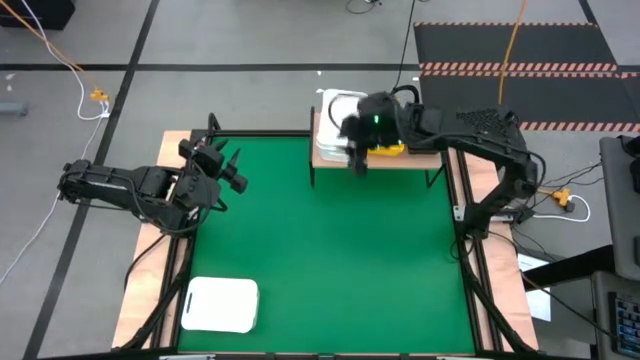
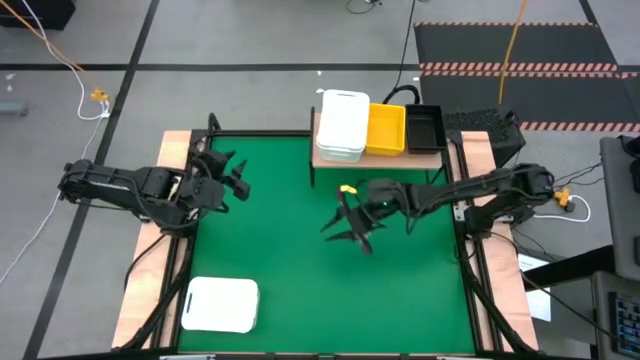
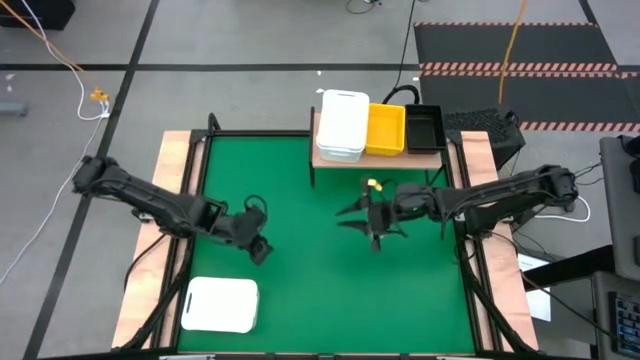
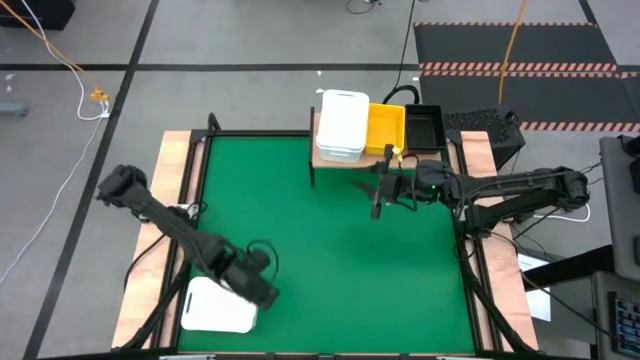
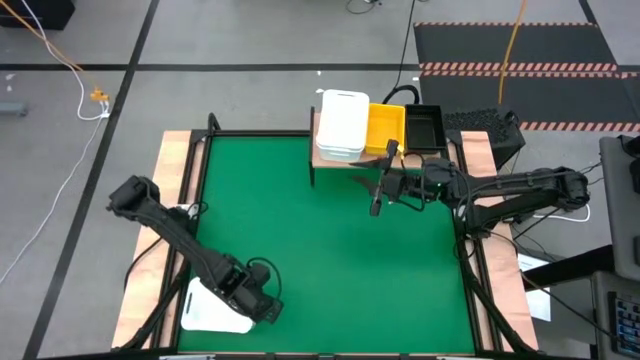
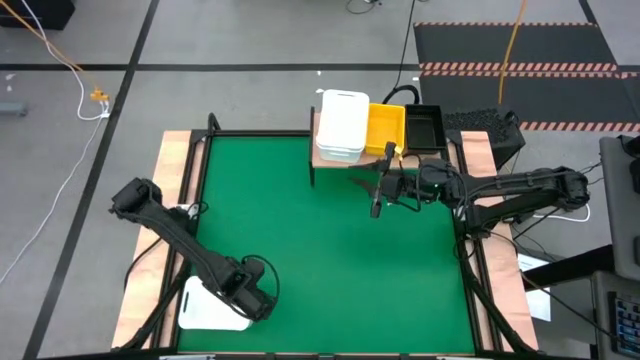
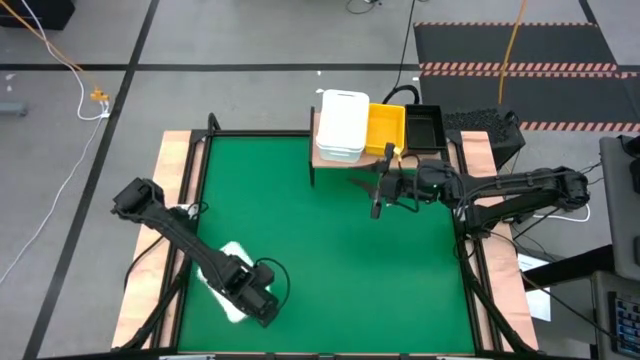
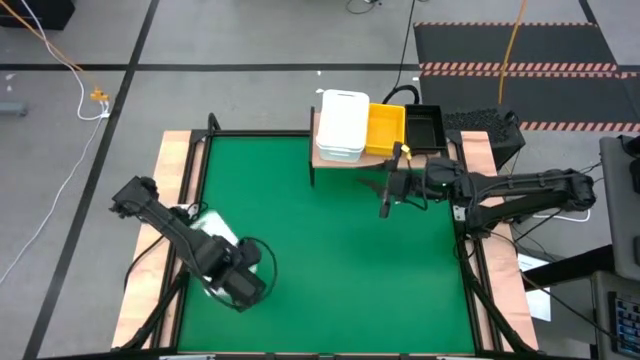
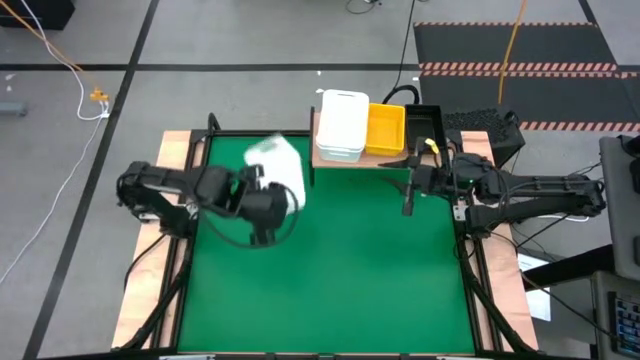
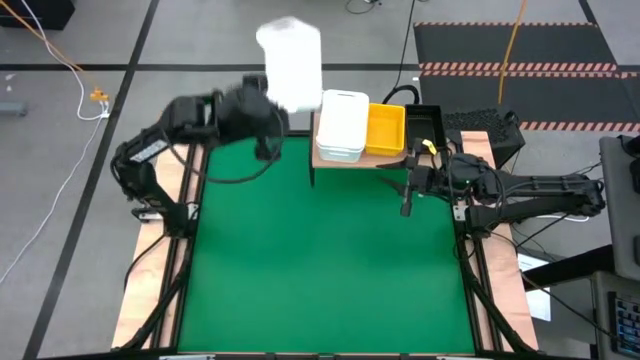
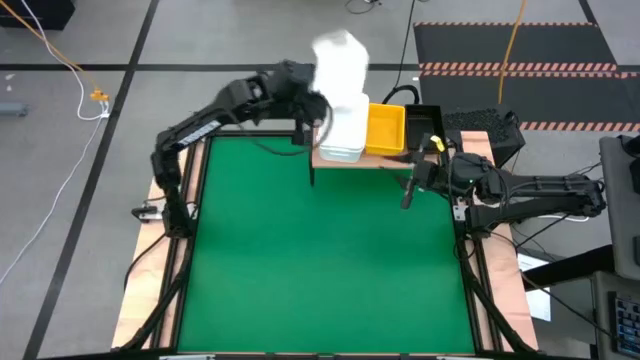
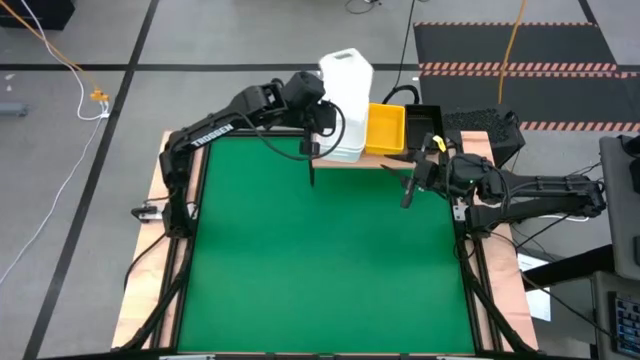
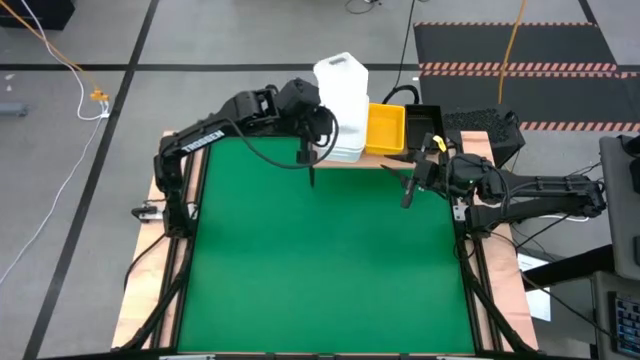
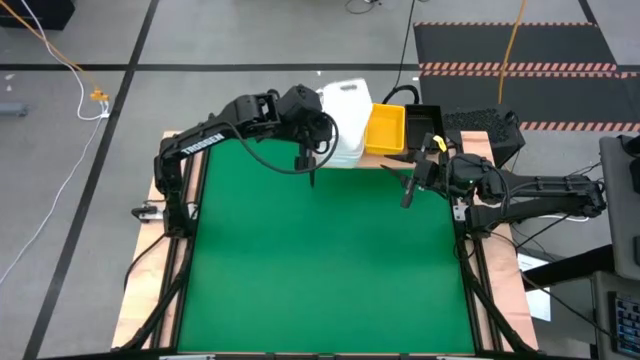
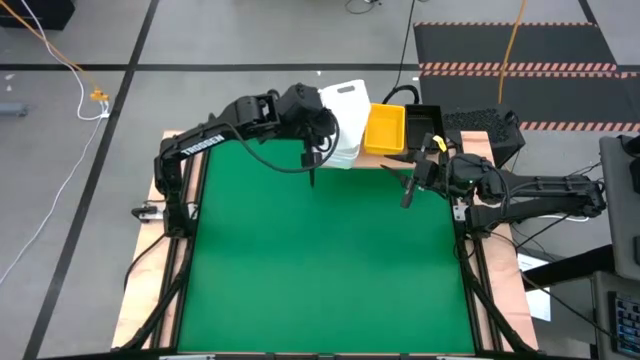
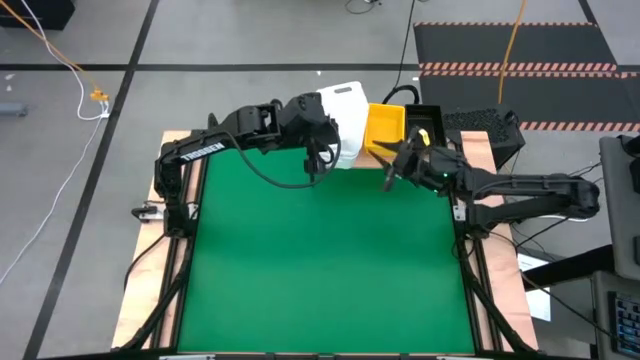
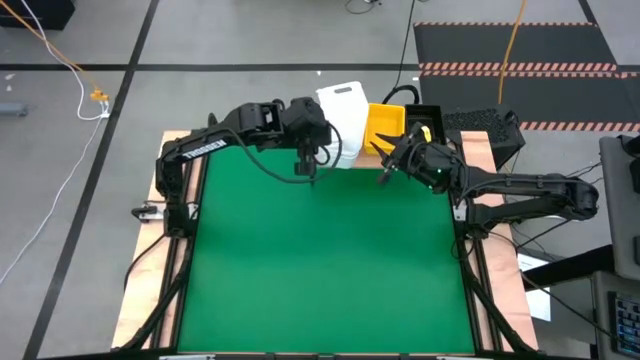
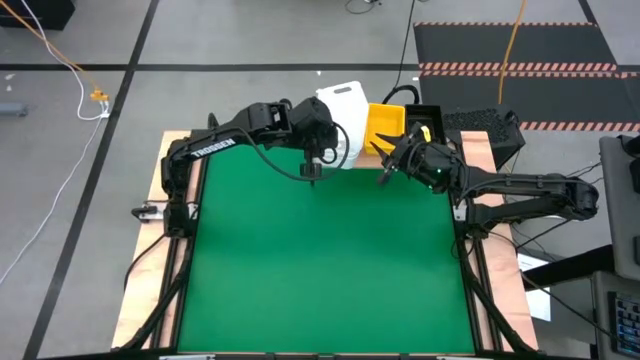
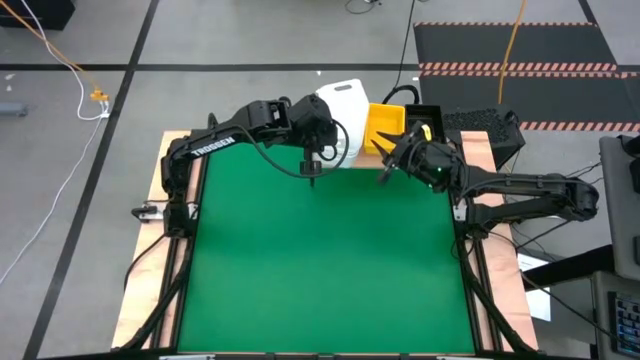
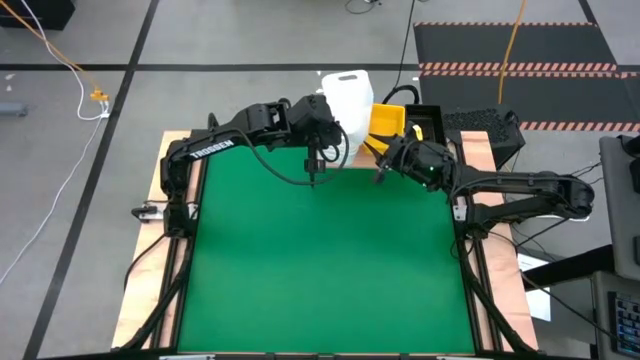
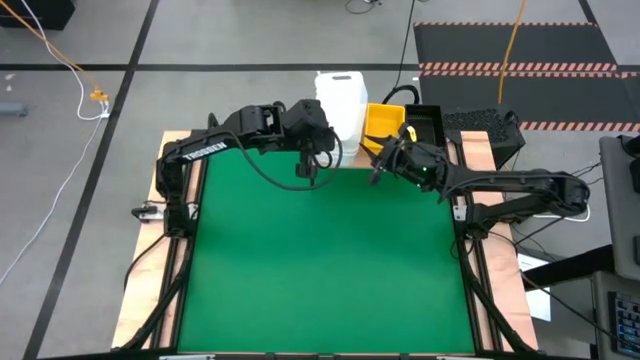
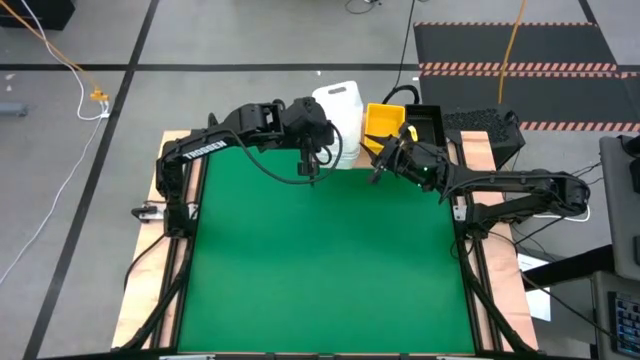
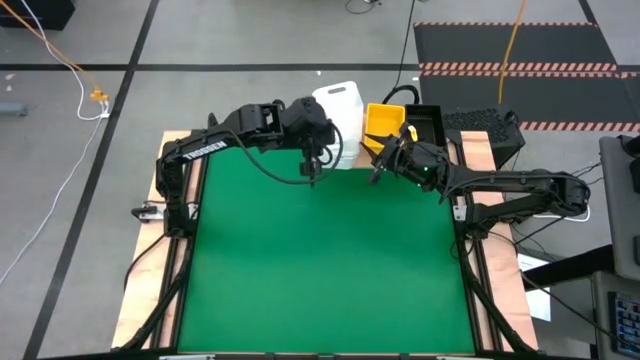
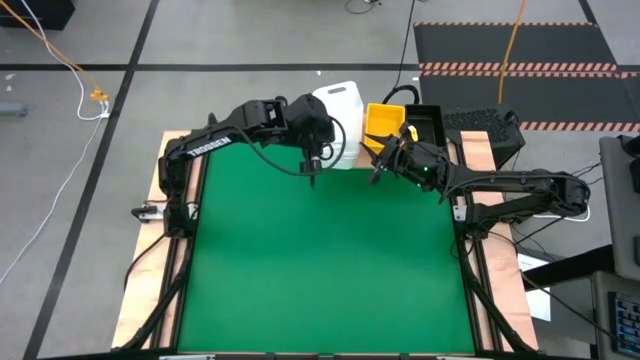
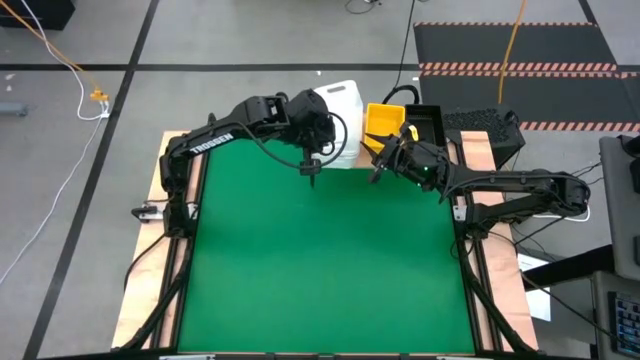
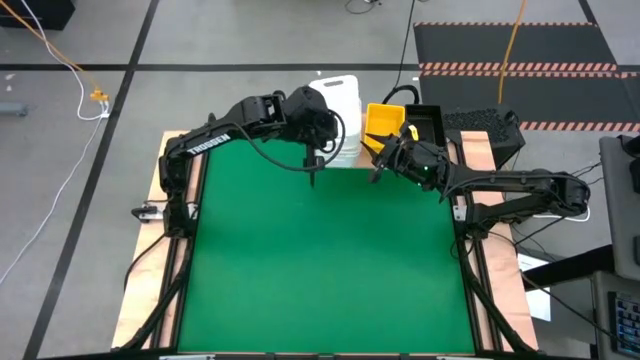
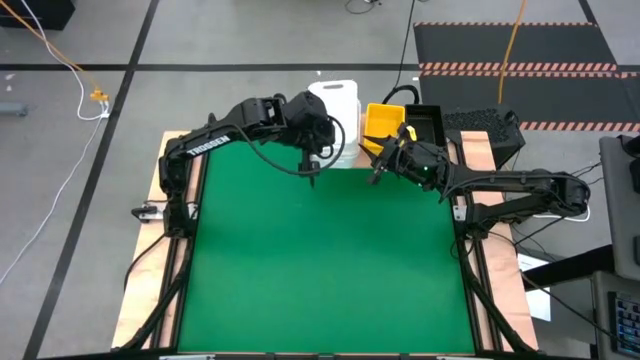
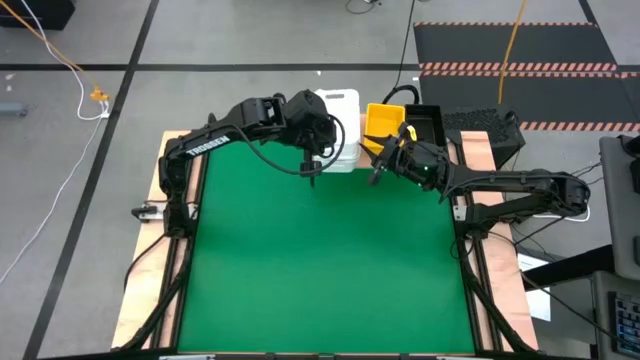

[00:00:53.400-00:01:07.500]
Task: Stack baskets on shelf by color
Stack the white bin into the stacked white bins on the shelf

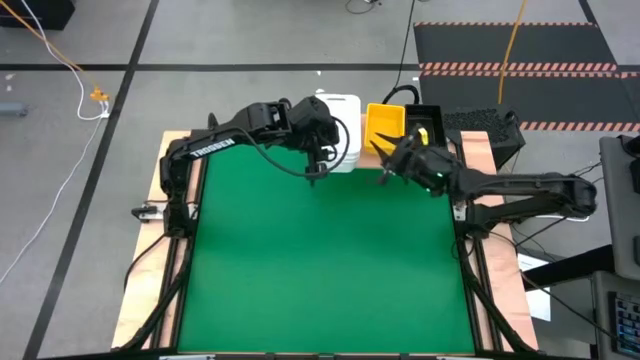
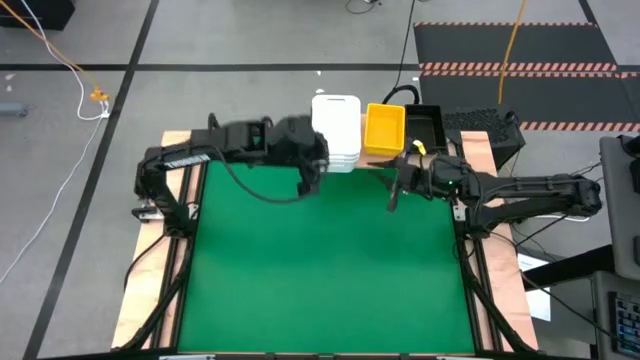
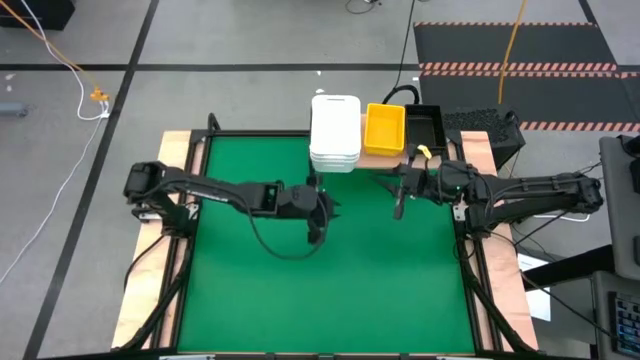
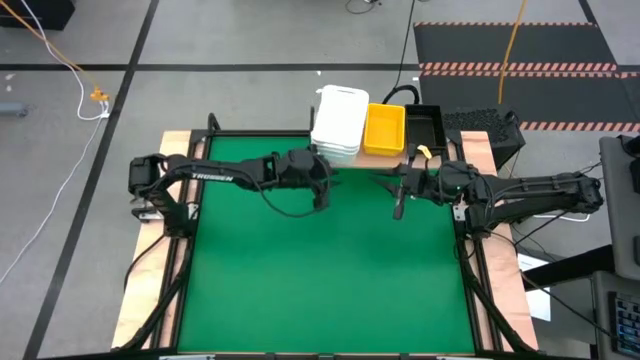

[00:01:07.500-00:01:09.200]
Adjust the stacked white bins

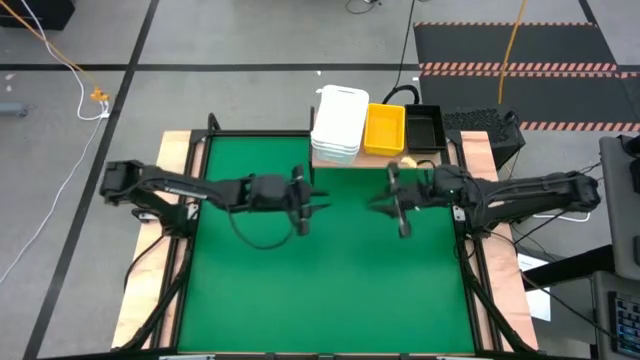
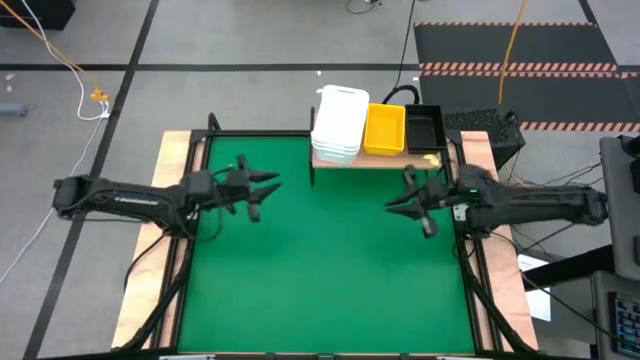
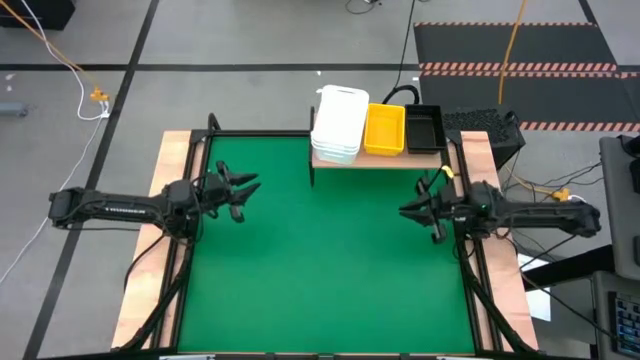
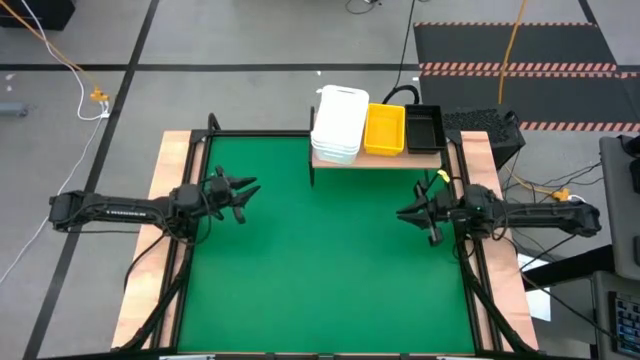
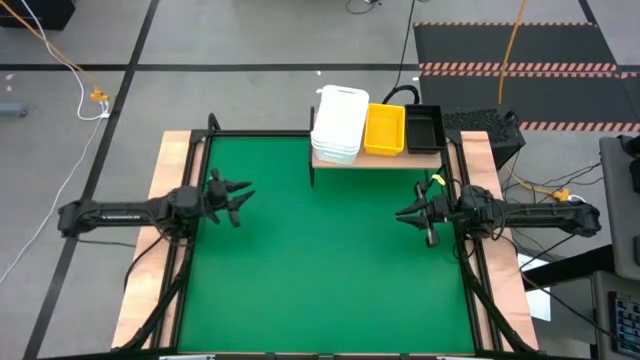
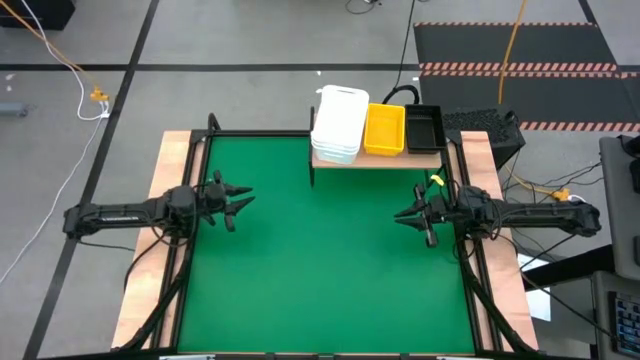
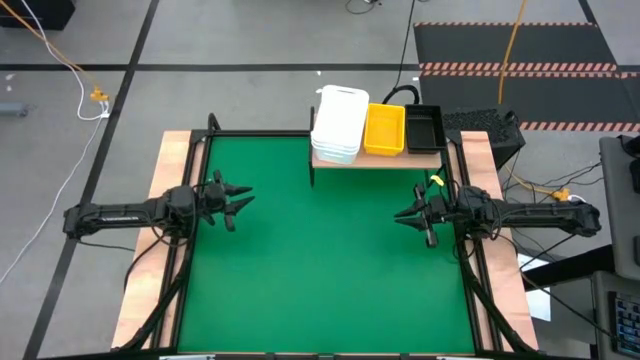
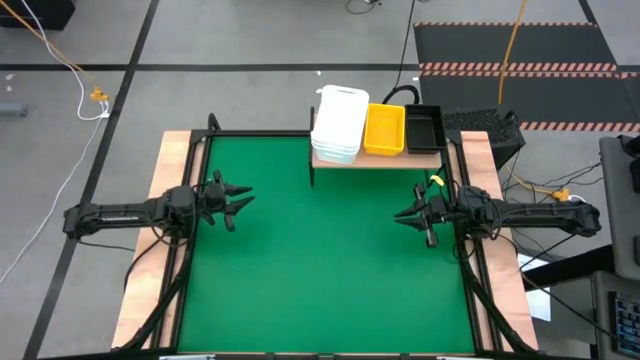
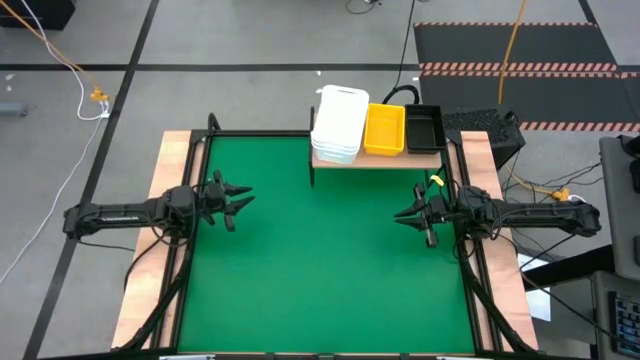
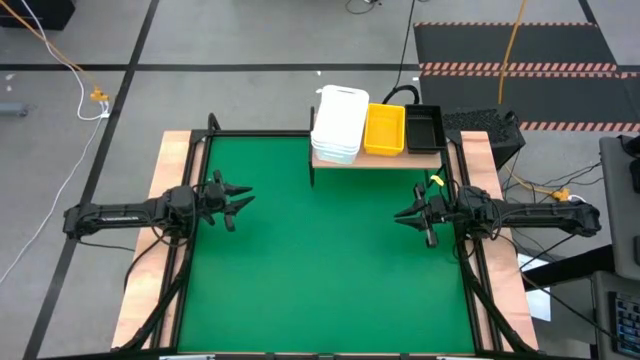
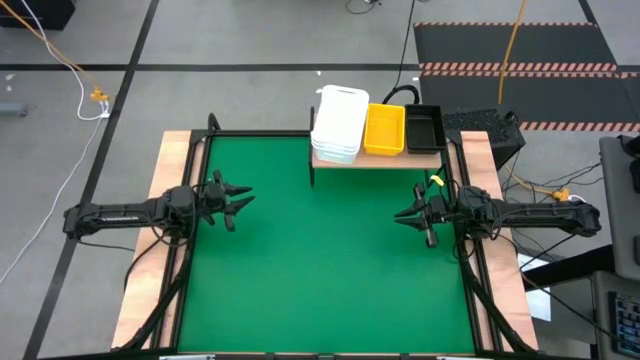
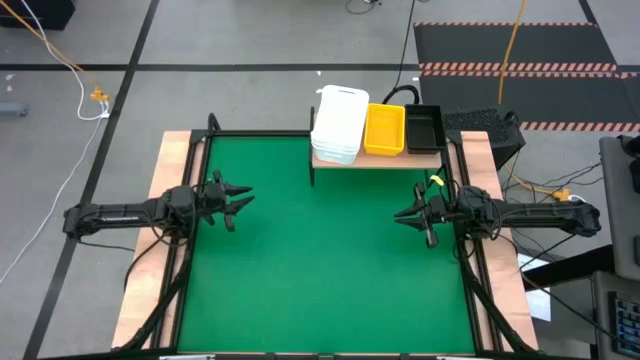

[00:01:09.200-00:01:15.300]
Return to Home Position
